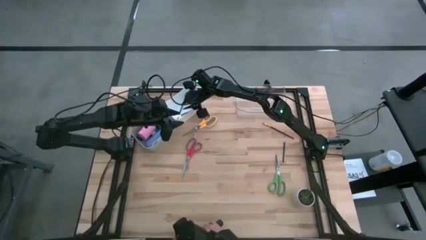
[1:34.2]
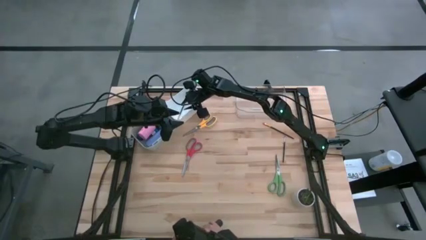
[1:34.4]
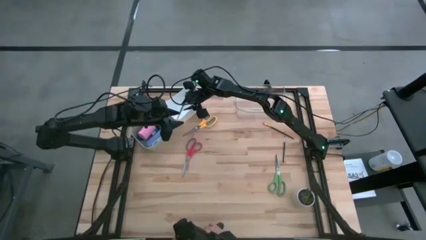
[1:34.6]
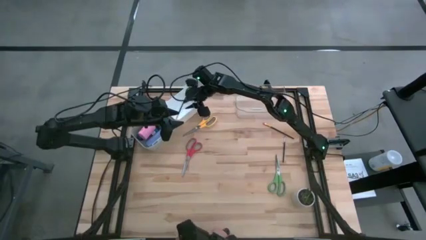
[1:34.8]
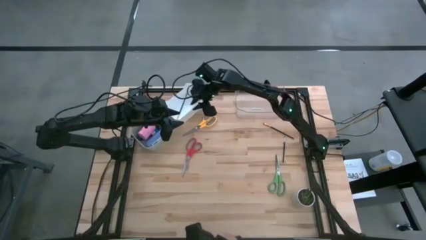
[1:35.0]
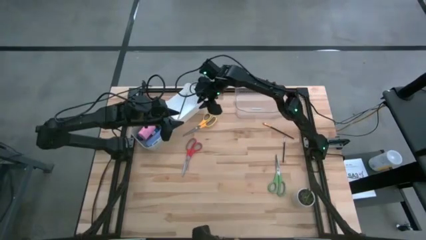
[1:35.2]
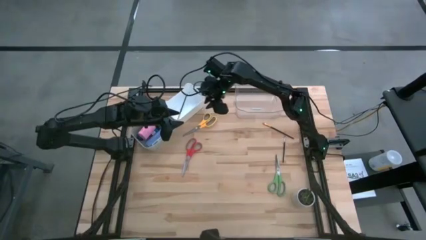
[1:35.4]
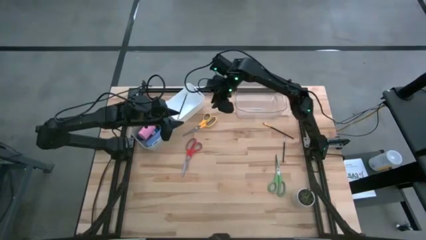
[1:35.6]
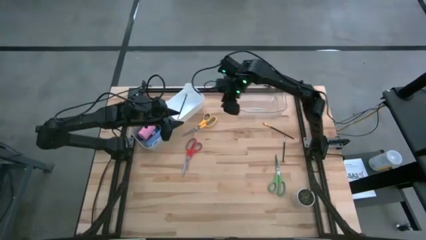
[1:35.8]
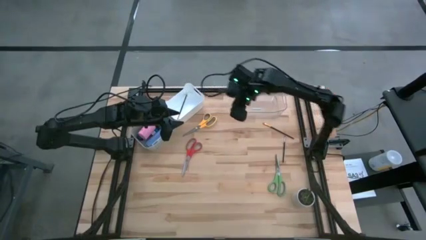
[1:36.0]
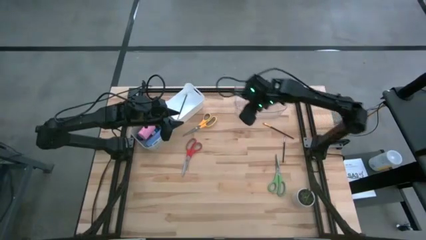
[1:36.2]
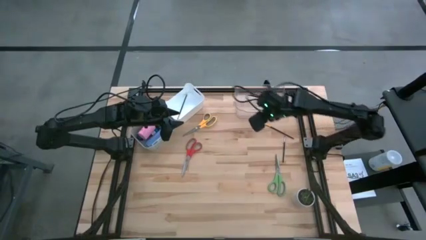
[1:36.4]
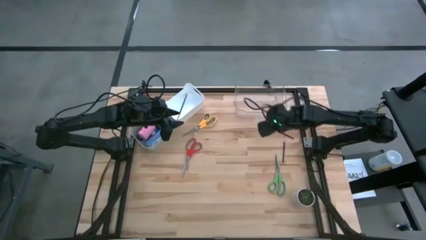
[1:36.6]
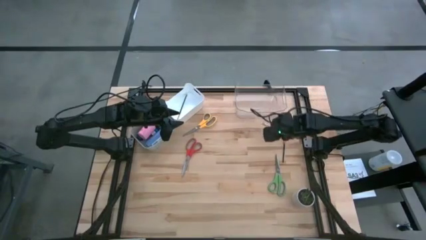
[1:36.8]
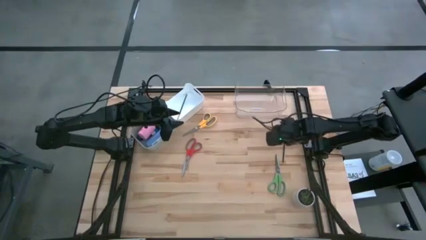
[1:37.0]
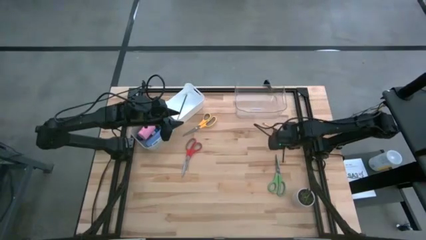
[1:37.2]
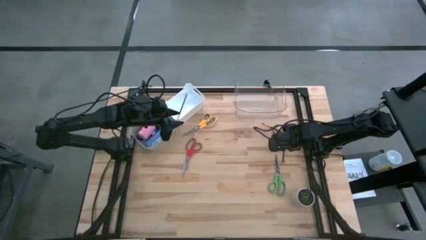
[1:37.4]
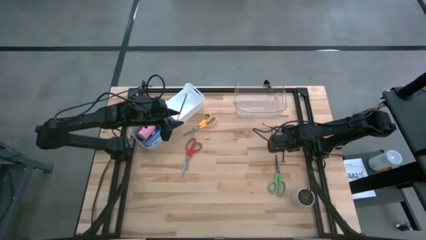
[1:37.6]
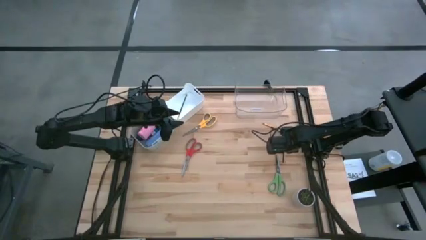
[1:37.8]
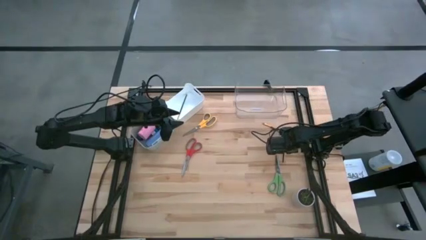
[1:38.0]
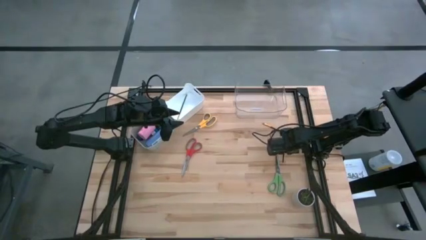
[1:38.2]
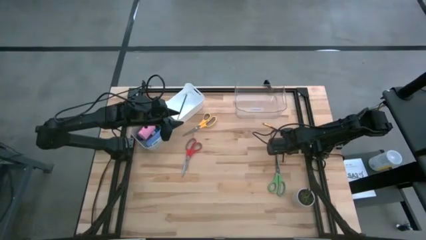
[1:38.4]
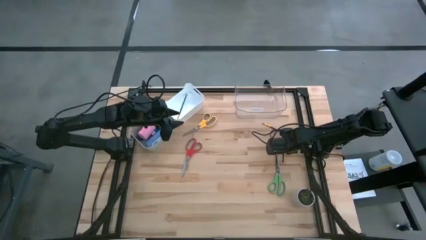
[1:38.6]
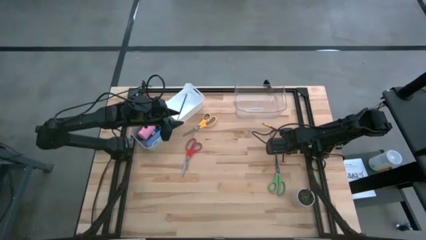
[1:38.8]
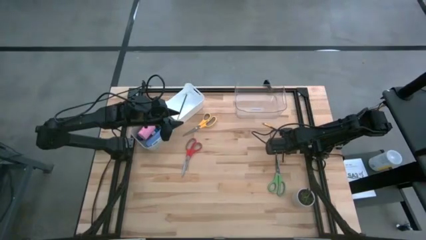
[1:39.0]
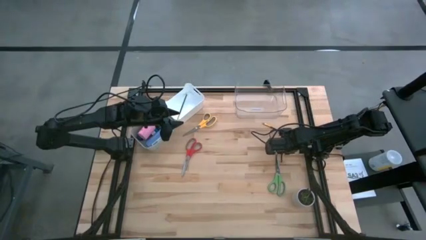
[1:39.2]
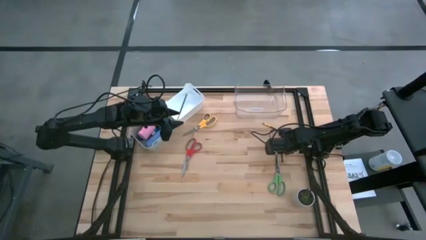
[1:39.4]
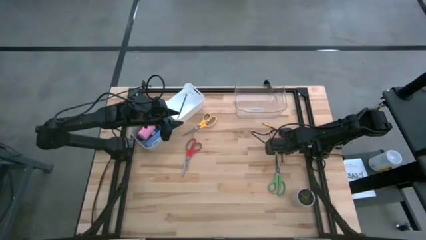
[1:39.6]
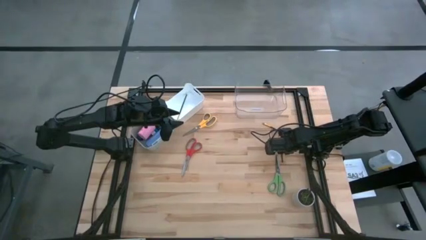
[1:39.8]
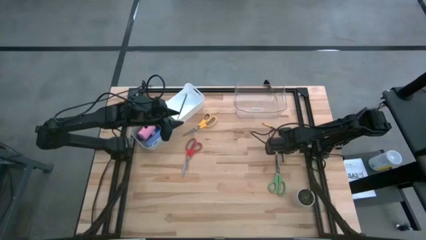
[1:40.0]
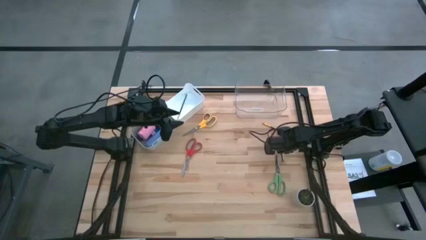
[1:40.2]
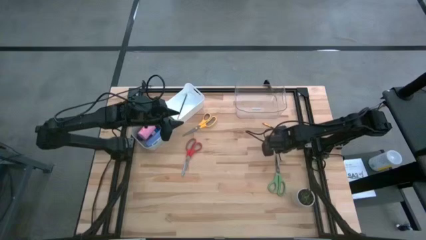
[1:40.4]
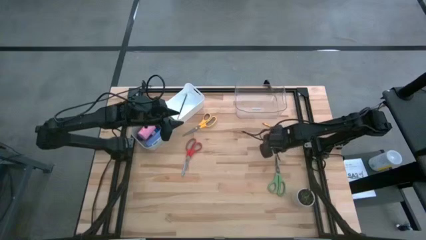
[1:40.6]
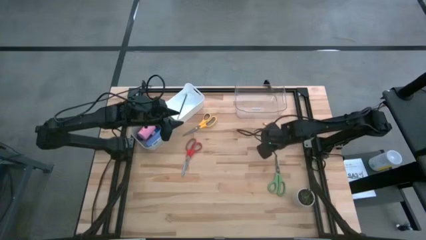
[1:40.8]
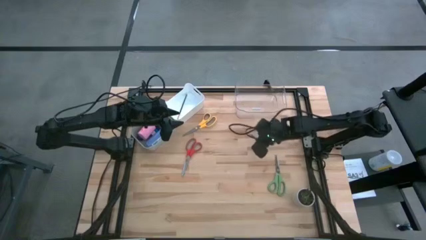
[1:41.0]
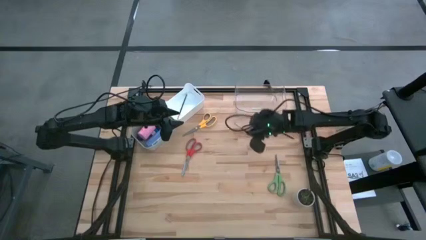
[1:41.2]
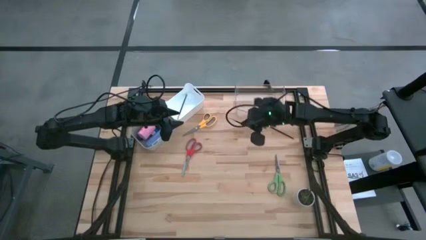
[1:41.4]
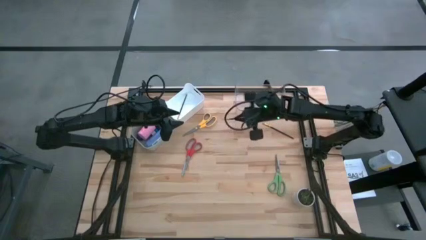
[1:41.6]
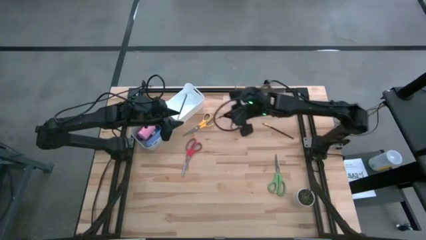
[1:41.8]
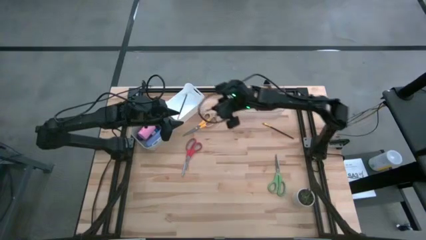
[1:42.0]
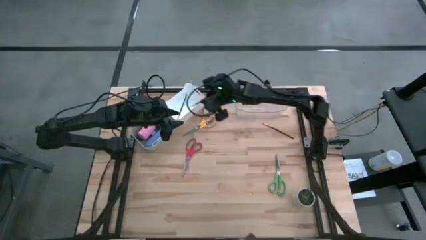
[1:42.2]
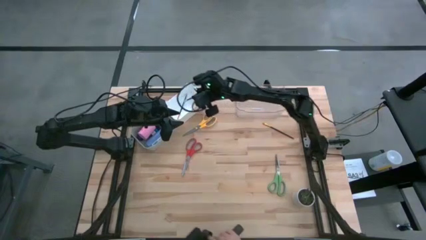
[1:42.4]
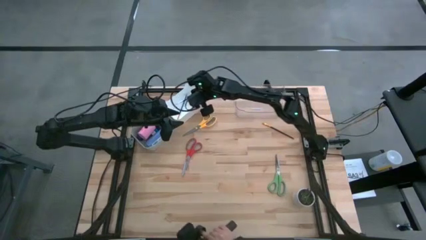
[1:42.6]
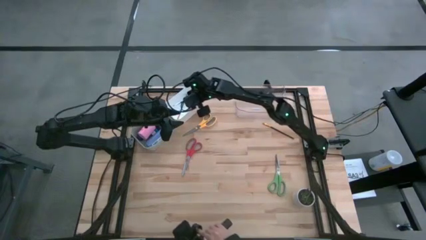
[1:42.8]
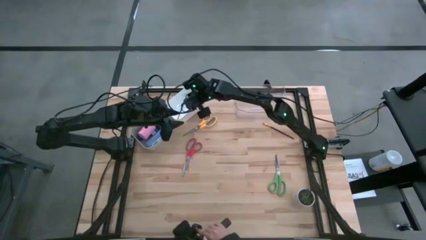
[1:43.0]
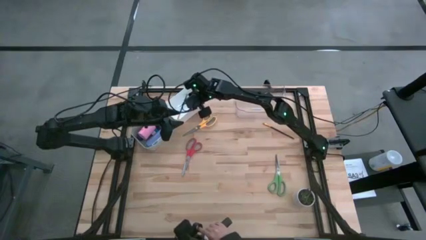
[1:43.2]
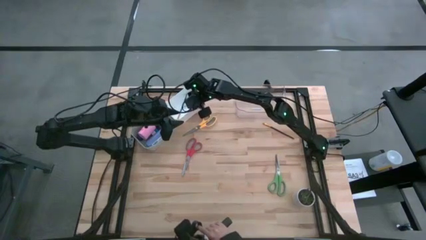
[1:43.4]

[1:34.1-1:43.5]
Task: Pick & Place Paint Supplies
Put the silver paint brush into the white bin

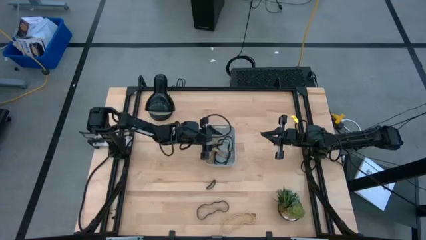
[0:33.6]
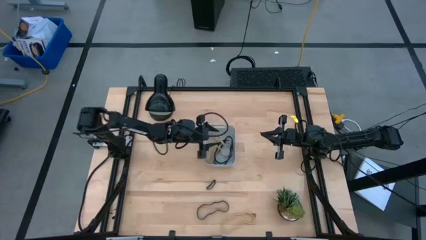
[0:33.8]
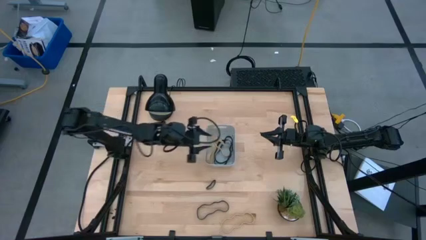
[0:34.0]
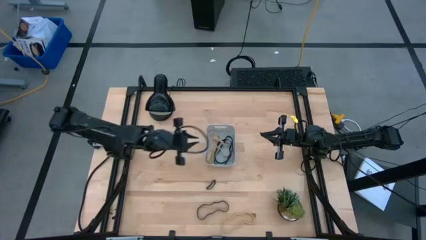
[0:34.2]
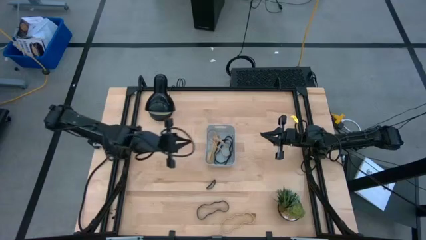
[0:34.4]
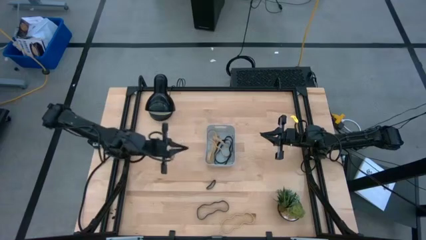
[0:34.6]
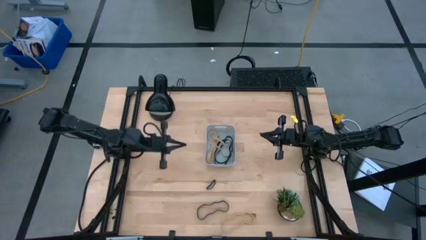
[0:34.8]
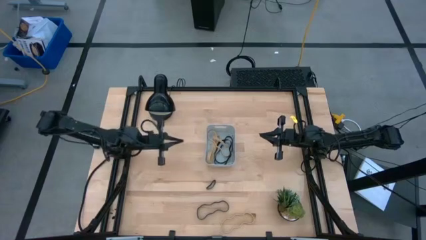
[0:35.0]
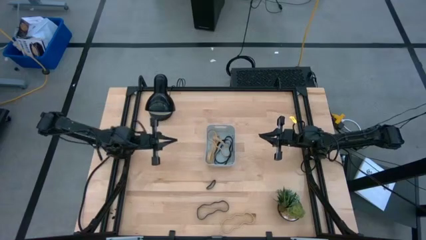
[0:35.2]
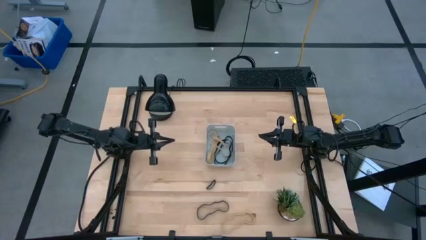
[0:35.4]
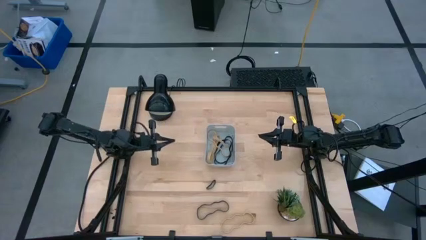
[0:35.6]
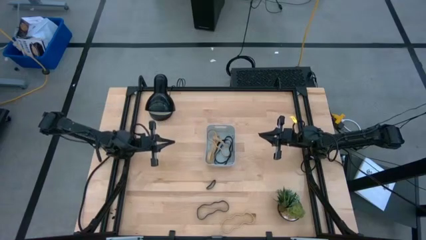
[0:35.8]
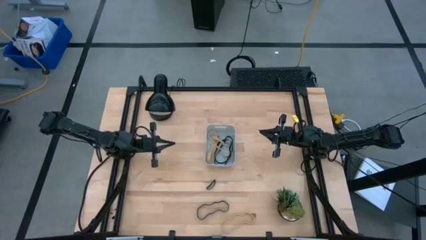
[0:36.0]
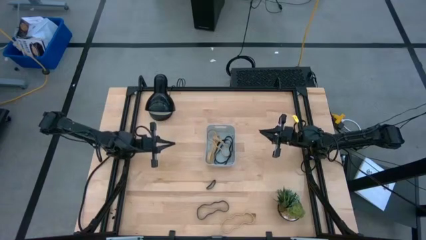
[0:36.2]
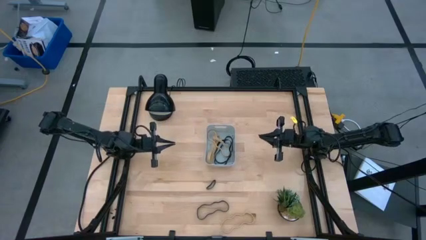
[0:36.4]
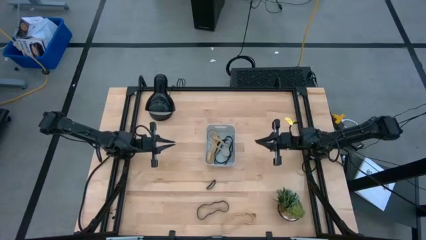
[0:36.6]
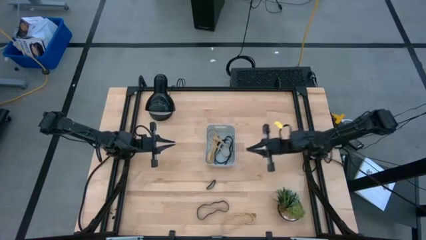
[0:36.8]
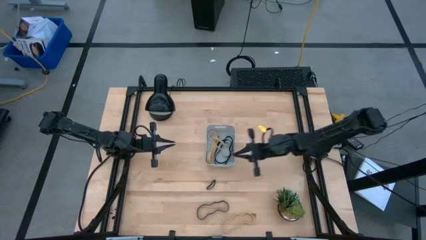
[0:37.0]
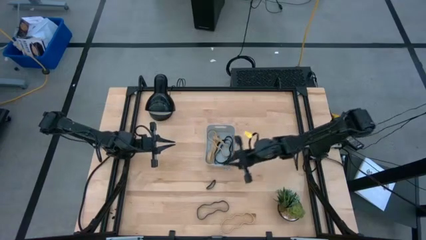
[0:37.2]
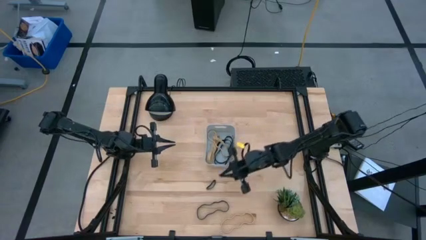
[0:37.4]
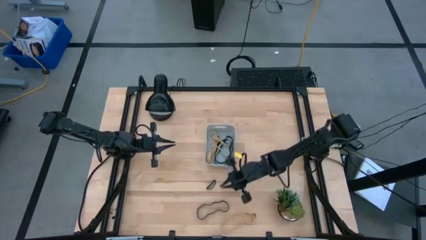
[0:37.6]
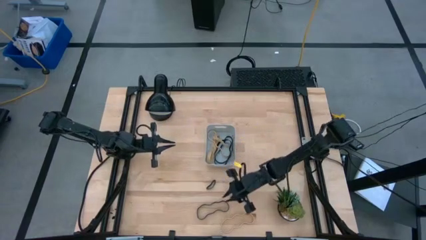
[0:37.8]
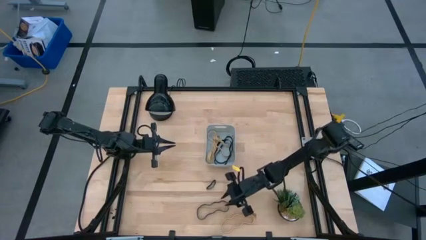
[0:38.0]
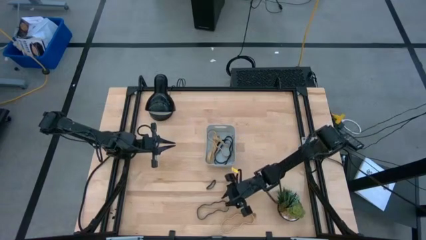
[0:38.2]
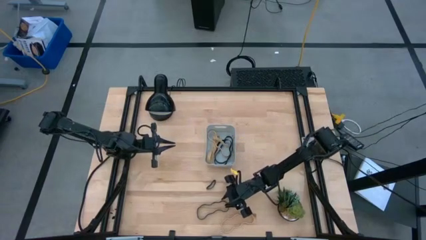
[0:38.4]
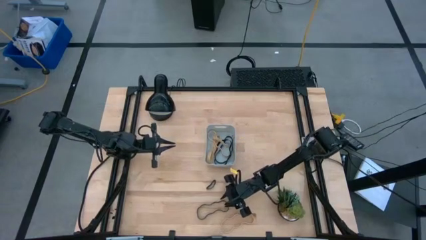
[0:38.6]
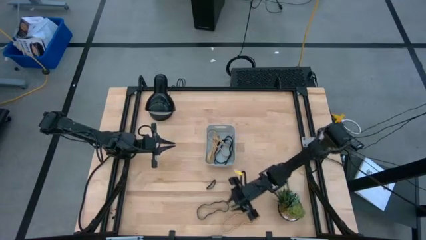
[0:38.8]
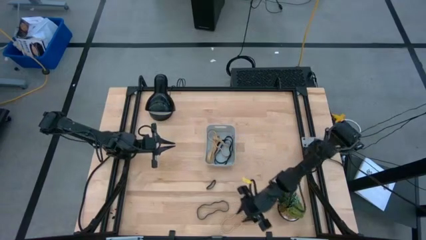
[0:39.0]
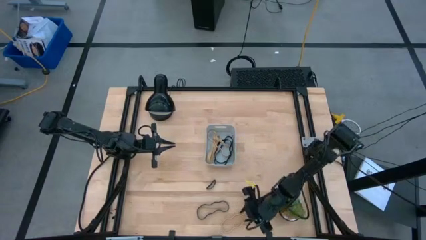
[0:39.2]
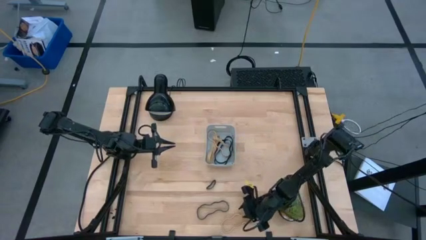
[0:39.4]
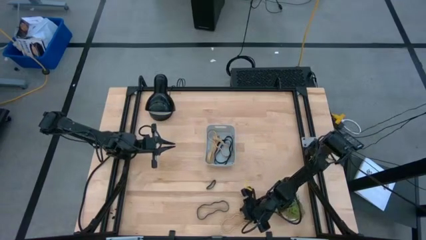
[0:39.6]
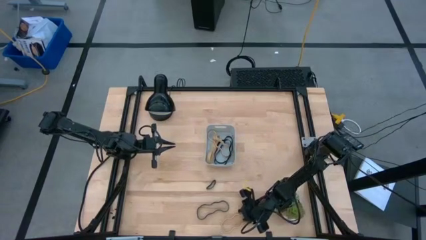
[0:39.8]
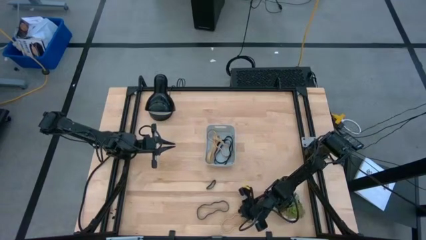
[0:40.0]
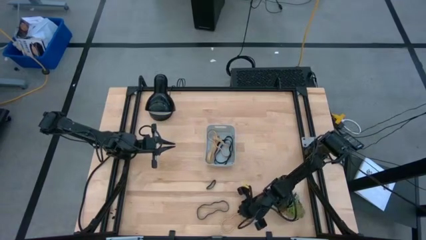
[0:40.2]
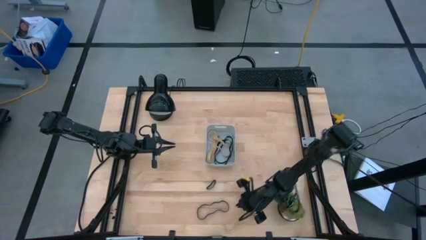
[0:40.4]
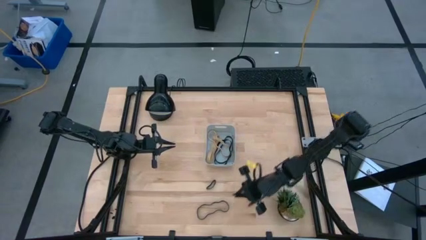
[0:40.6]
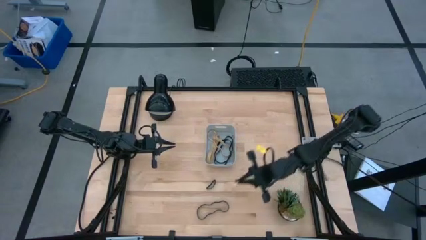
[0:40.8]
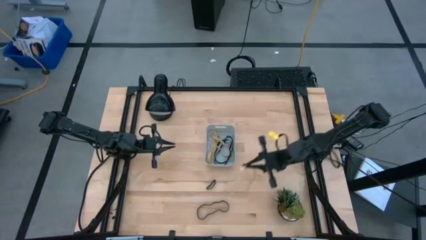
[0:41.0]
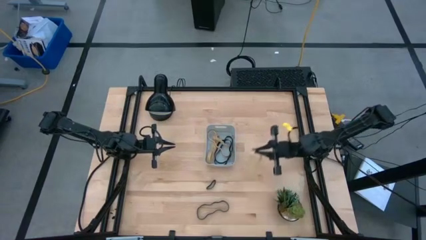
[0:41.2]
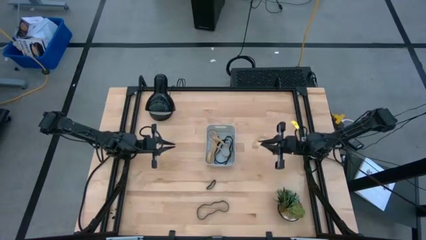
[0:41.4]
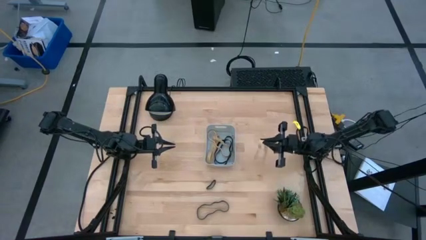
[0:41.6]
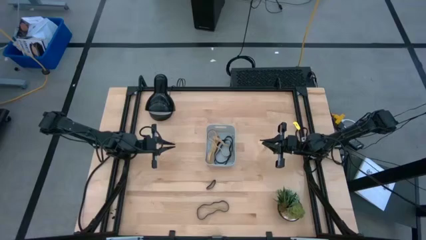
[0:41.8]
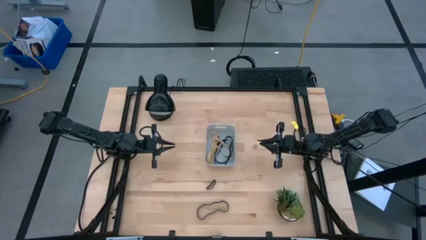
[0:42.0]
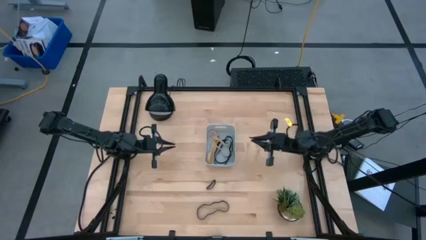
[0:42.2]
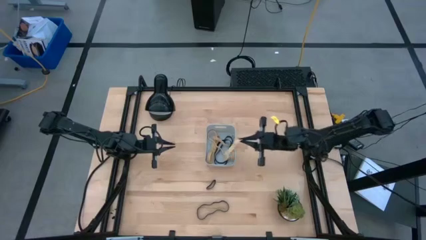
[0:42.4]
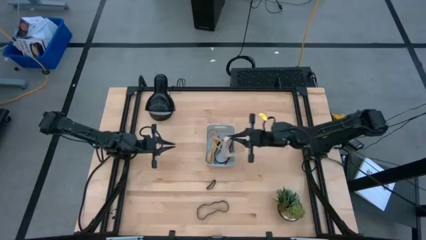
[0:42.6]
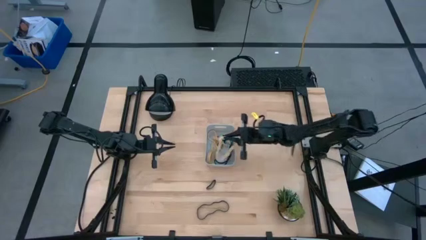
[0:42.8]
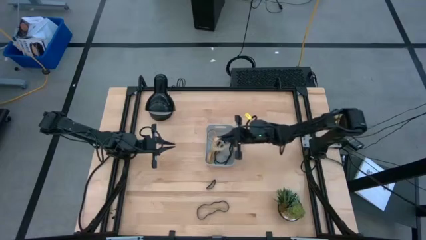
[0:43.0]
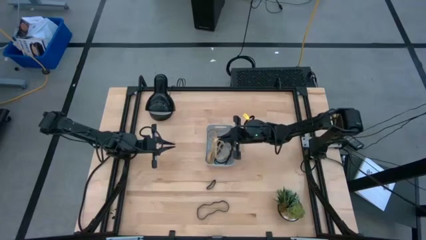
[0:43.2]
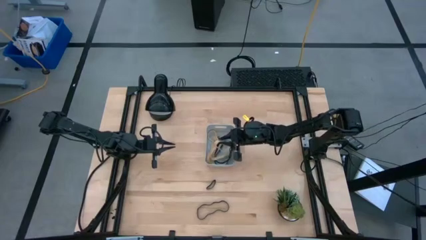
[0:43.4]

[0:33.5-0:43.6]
Task: Pick and place rubber bands into bin
Put the brown rubber band into the gray bin
